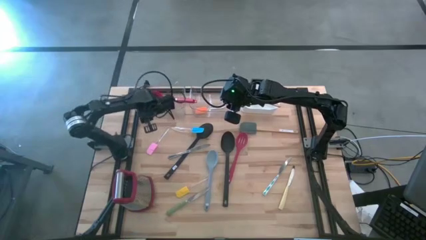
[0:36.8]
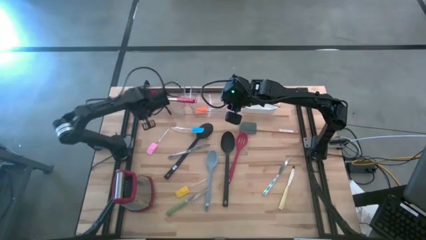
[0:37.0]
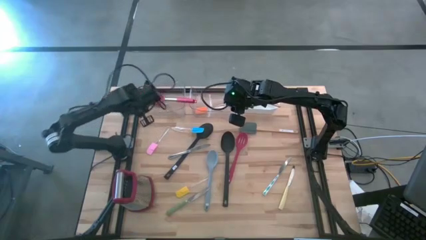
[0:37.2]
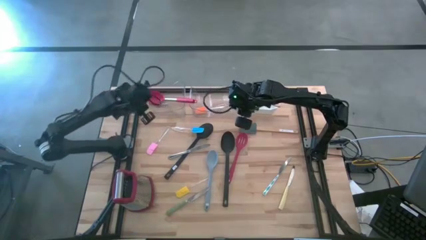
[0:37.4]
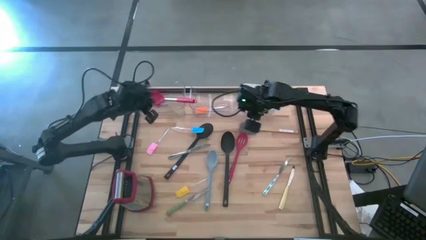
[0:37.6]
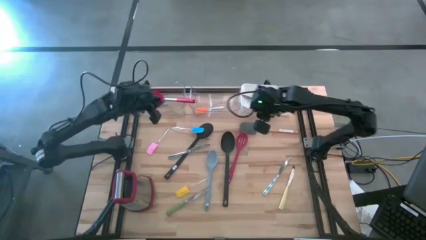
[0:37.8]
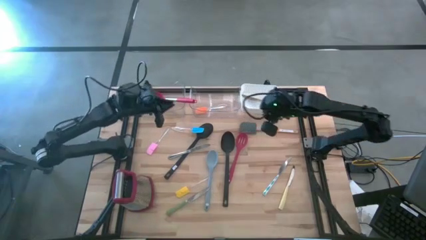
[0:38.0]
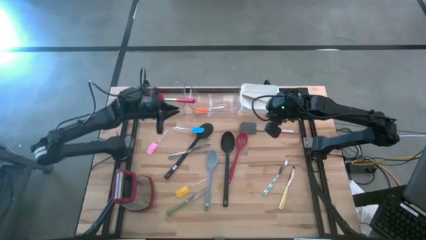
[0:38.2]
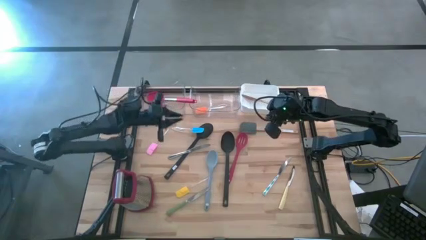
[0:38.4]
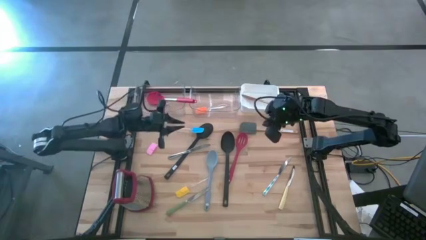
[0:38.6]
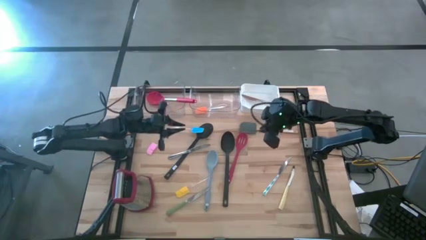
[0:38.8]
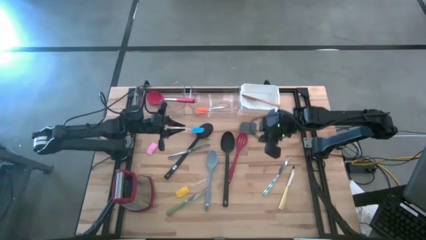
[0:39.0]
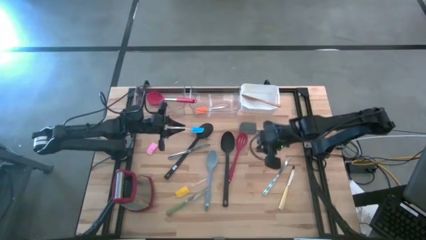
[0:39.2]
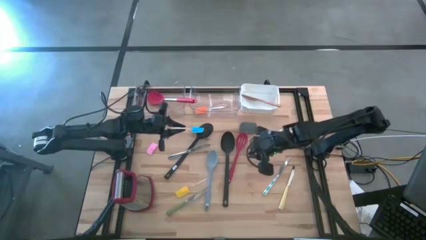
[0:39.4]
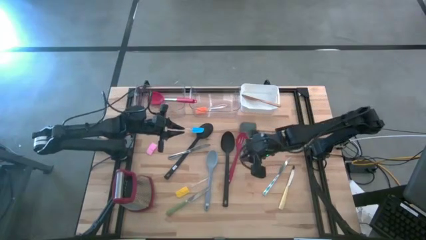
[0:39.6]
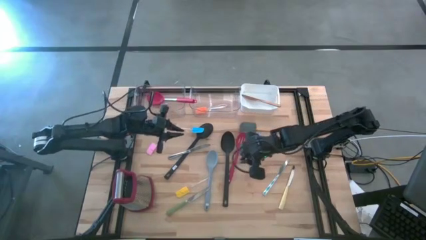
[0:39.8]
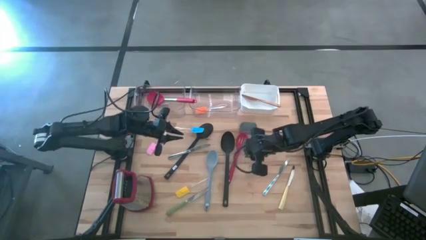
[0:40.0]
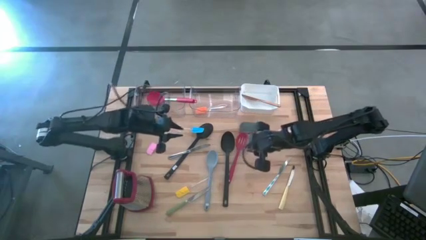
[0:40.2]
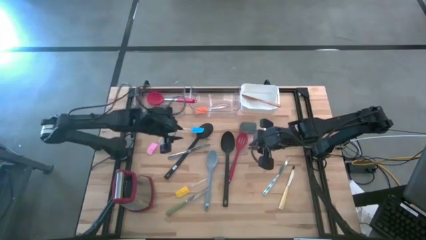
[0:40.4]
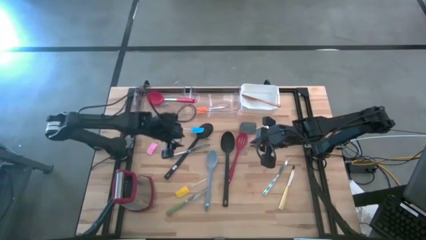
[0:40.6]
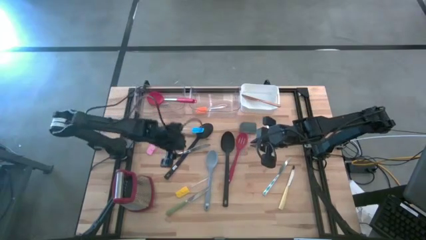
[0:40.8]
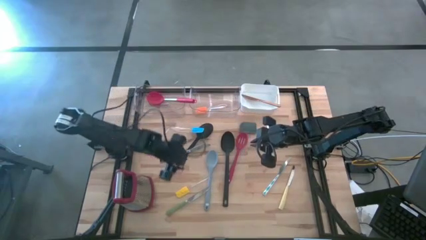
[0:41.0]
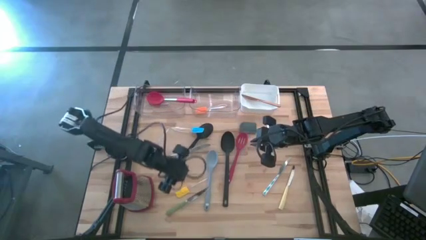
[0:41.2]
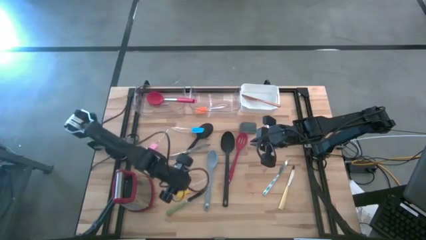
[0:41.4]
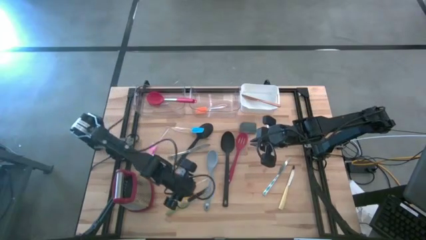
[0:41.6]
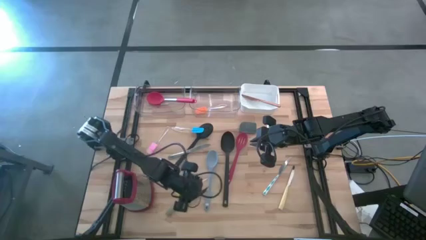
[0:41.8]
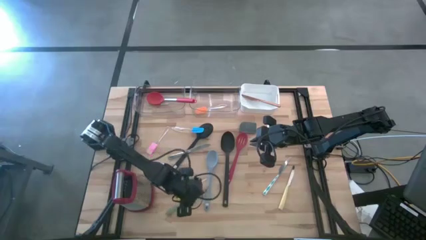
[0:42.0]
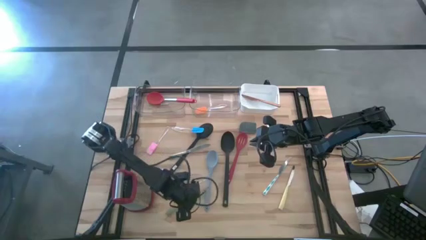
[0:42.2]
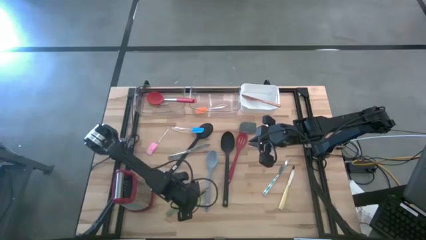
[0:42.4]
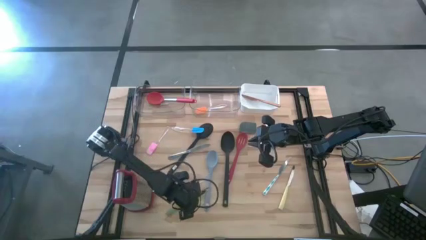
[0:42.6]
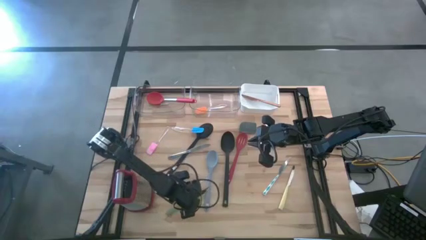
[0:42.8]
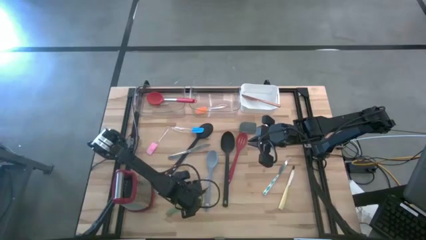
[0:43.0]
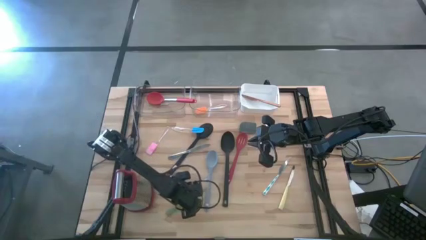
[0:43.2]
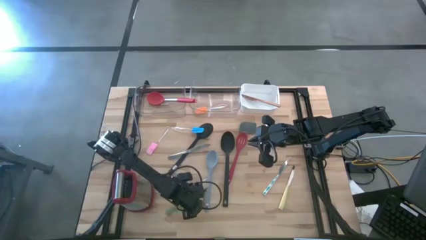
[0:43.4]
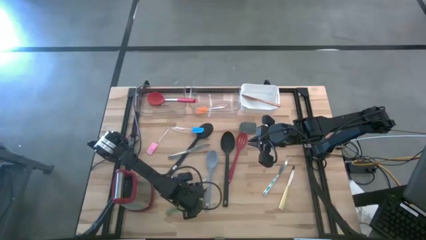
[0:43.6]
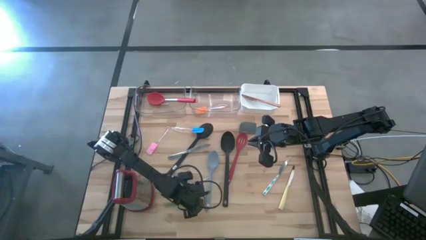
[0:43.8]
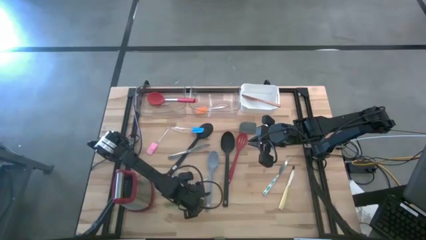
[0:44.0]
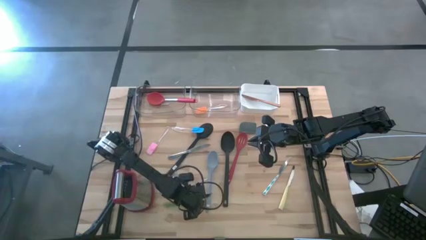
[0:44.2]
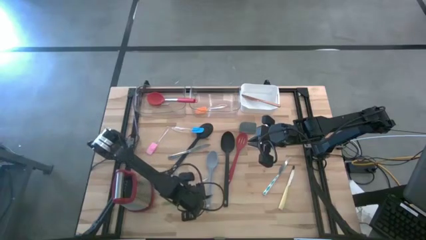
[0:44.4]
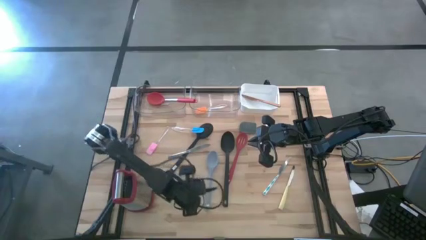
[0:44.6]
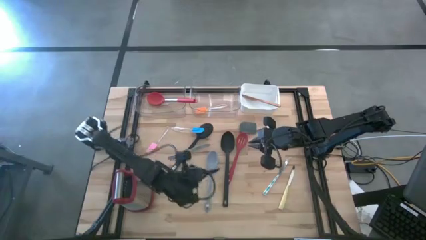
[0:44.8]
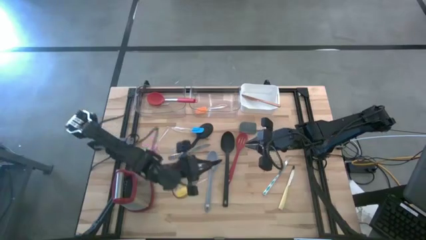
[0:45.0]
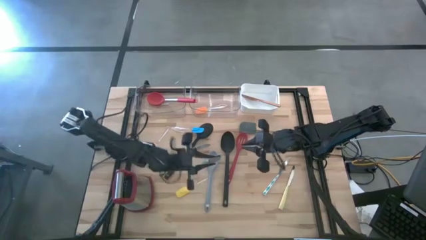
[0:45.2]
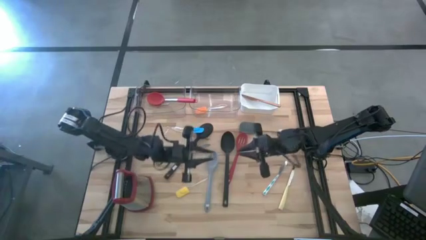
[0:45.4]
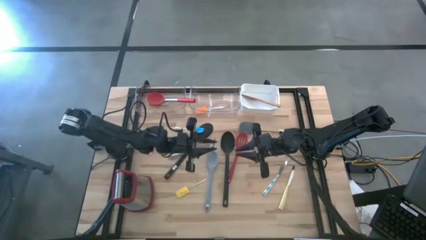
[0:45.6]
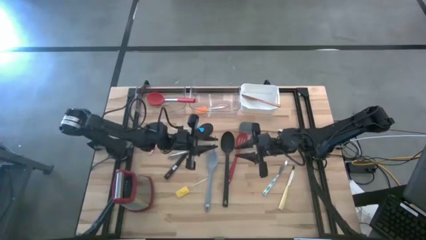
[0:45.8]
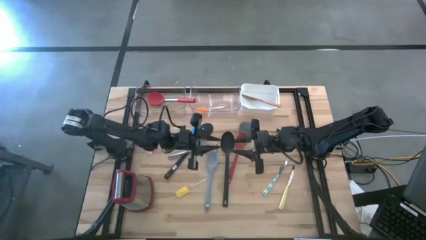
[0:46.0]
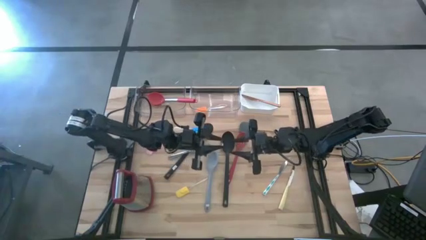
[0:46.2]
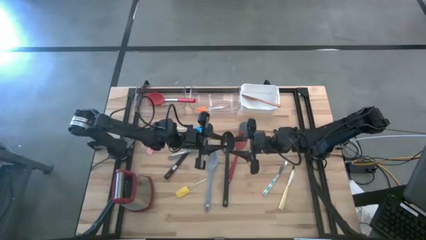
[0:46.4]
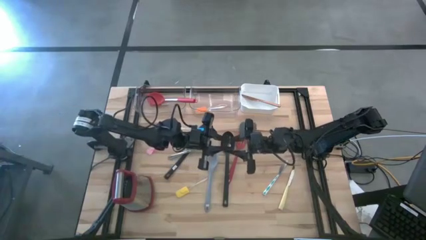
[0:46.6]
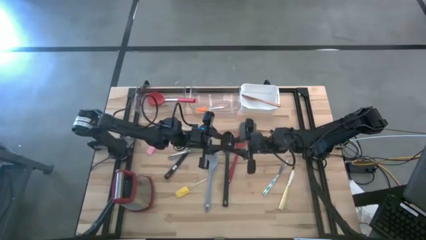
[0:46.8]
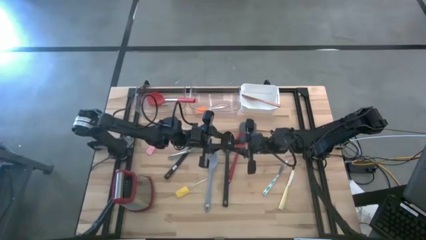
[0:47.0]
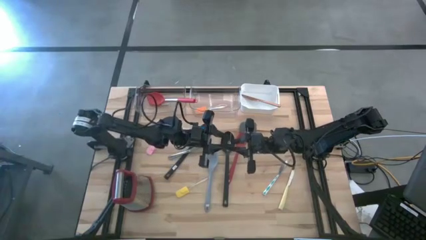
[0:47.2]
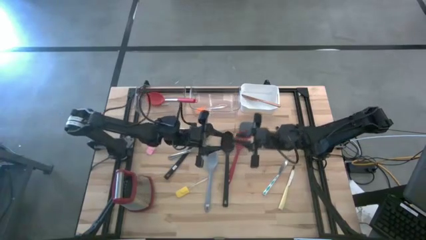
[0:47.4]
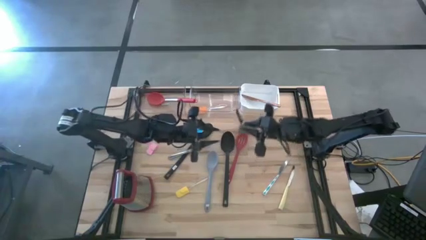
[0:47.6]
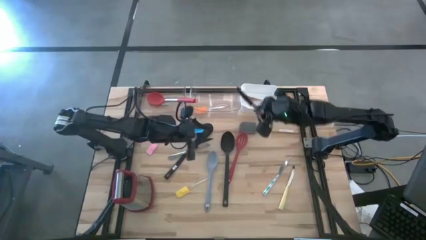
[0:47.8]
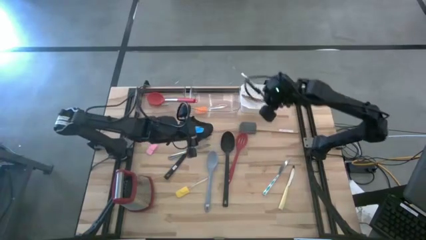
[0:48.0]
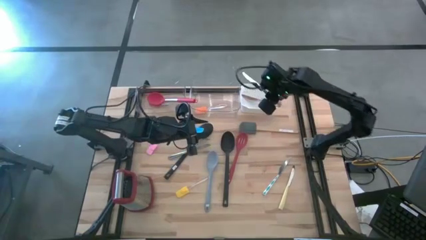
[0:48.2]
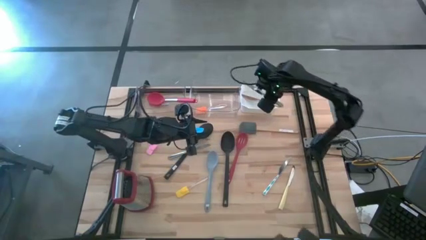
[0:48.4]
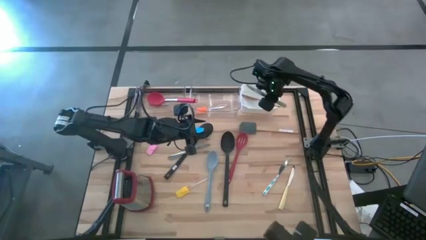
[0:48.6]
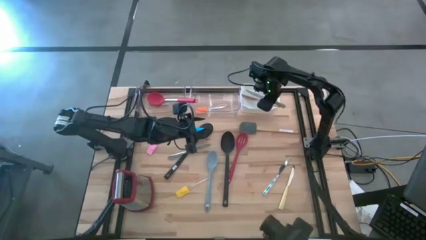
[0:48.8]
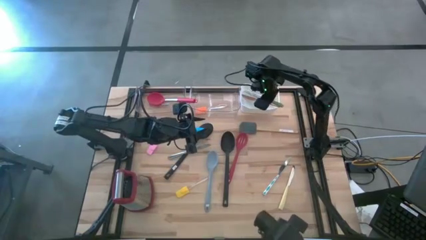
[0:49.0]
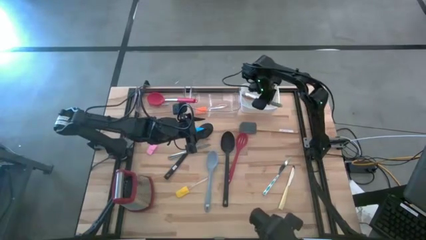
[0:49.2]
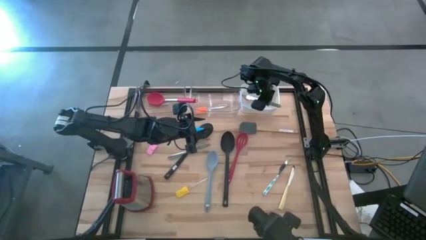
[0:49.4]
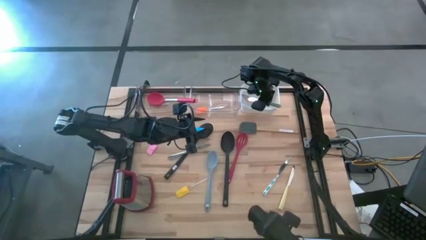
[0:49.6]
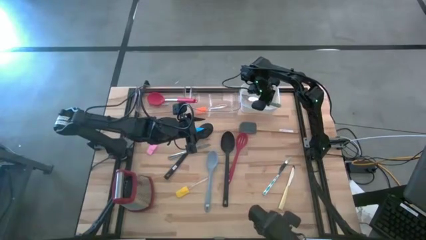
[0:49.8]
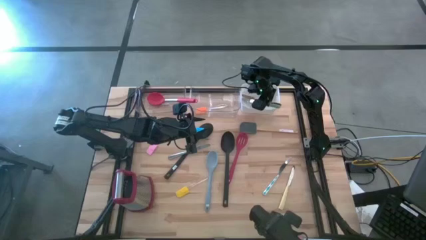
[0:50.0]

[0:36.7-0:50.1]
Task: Pick & Place Kitchen Items
Put the green table knife into the white bin
